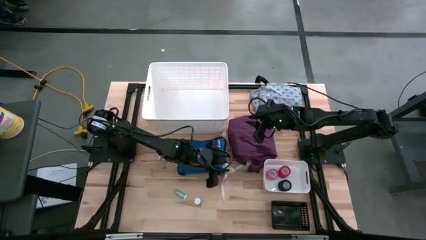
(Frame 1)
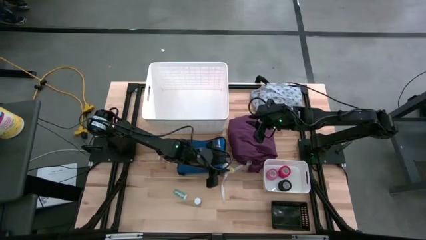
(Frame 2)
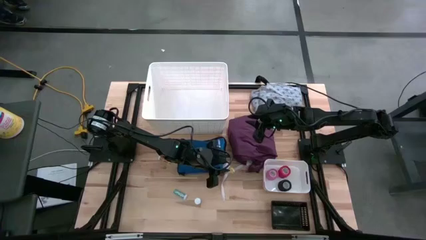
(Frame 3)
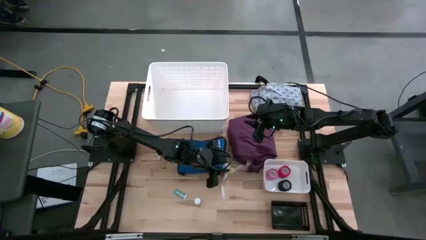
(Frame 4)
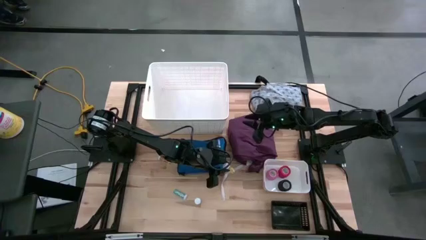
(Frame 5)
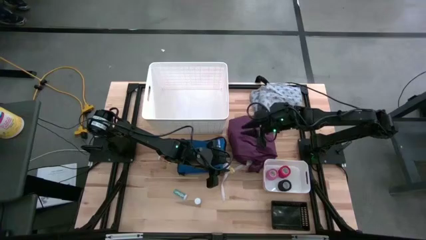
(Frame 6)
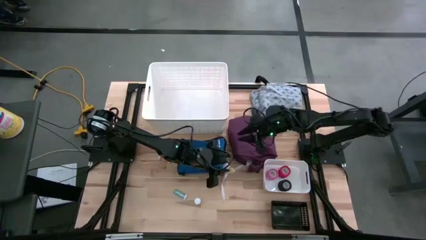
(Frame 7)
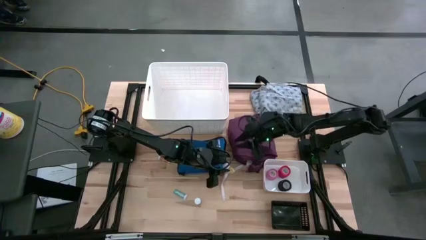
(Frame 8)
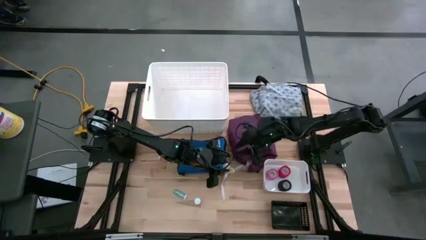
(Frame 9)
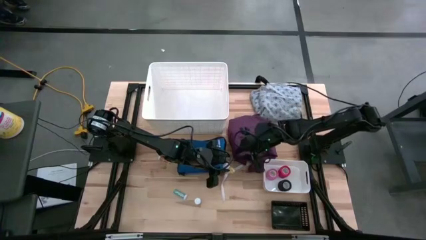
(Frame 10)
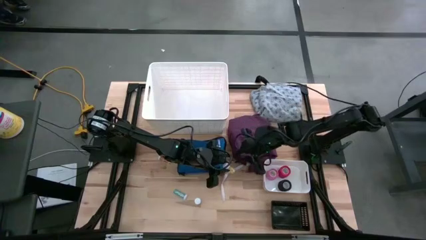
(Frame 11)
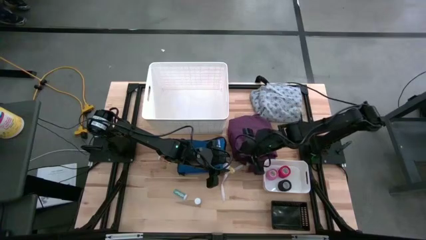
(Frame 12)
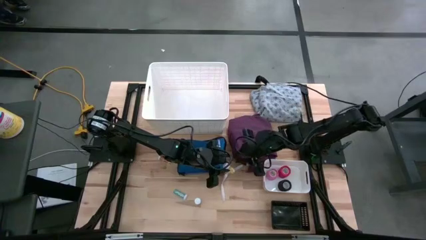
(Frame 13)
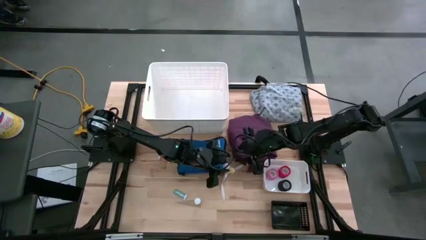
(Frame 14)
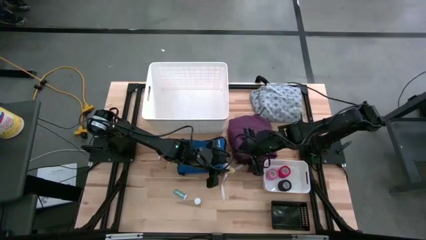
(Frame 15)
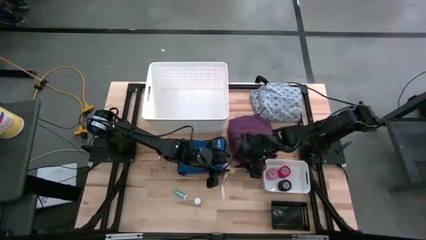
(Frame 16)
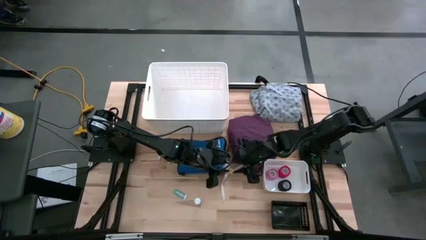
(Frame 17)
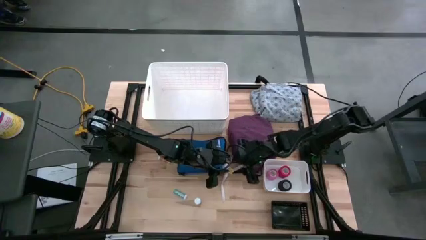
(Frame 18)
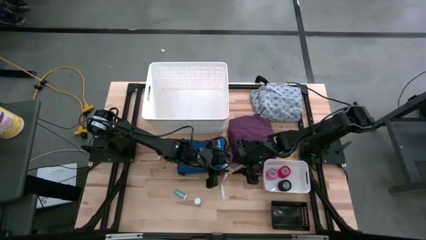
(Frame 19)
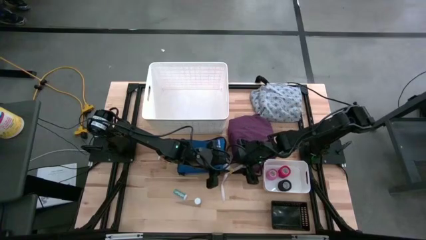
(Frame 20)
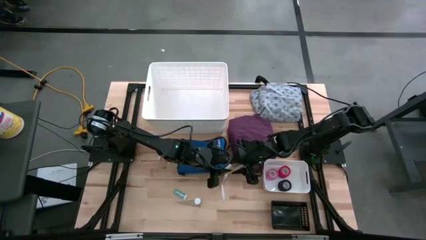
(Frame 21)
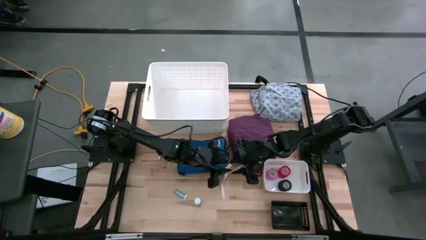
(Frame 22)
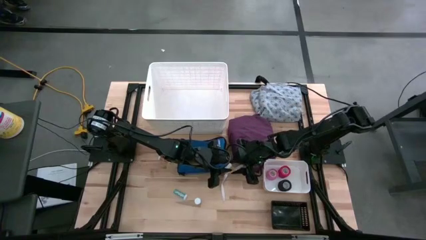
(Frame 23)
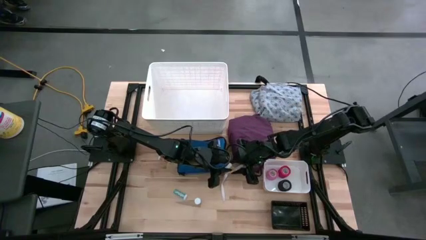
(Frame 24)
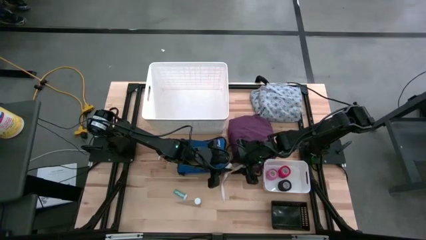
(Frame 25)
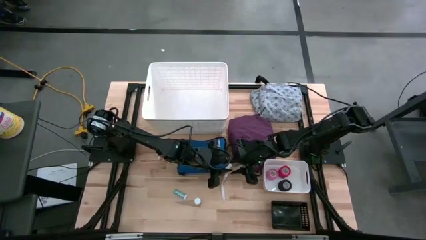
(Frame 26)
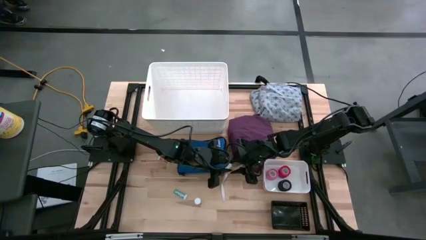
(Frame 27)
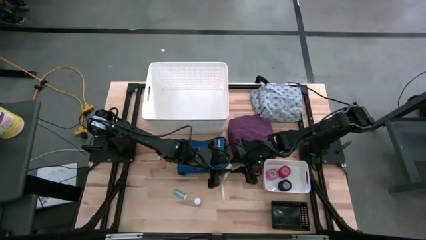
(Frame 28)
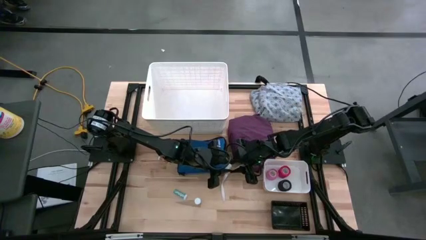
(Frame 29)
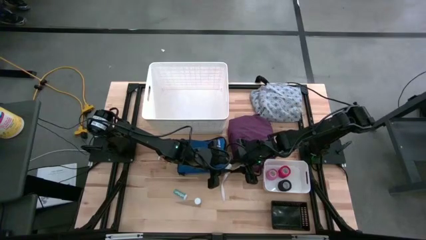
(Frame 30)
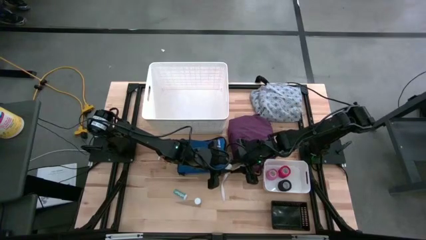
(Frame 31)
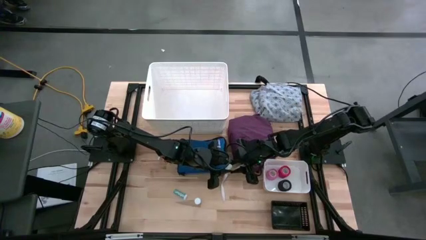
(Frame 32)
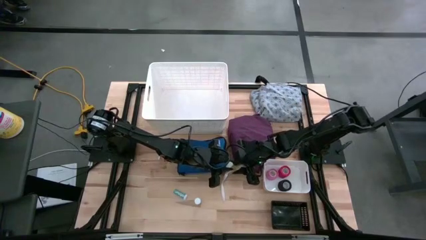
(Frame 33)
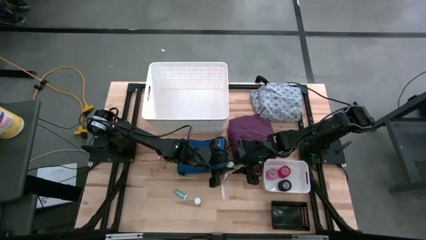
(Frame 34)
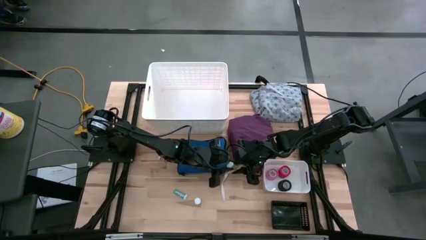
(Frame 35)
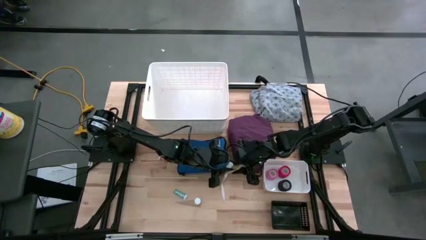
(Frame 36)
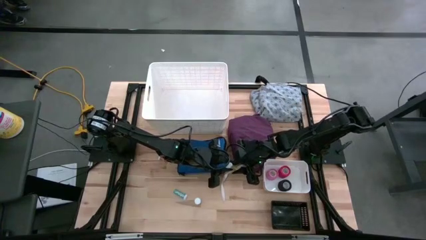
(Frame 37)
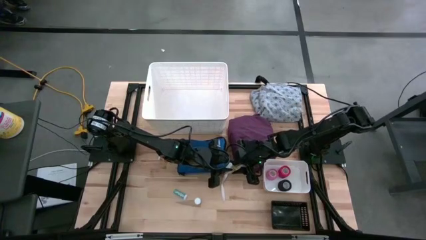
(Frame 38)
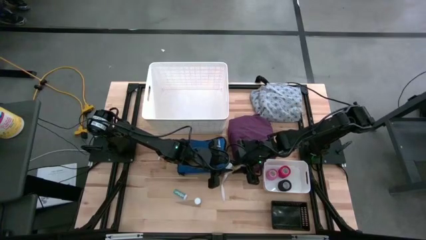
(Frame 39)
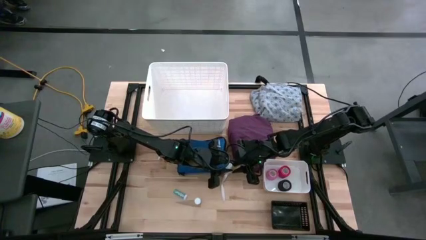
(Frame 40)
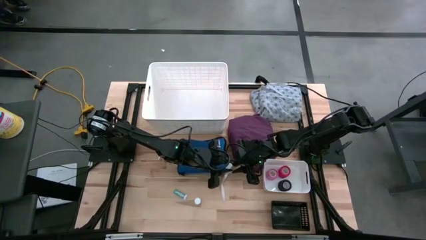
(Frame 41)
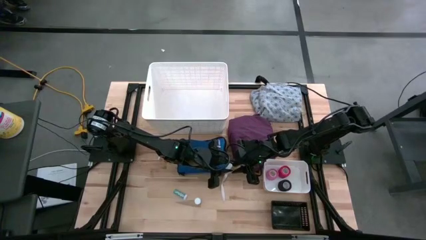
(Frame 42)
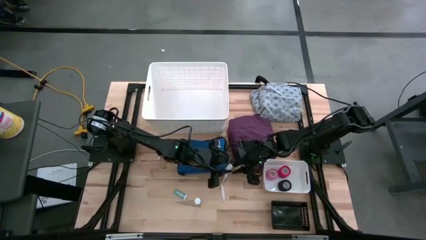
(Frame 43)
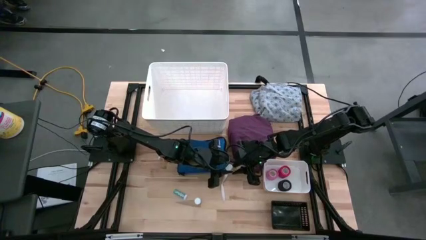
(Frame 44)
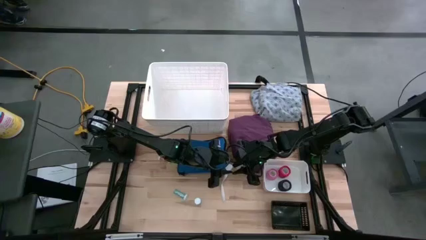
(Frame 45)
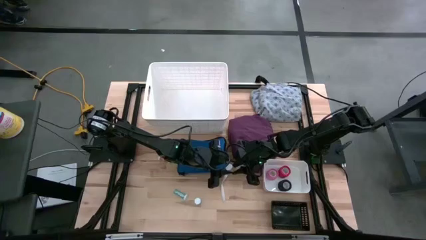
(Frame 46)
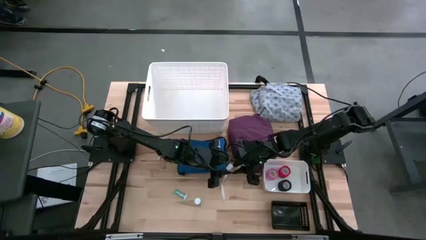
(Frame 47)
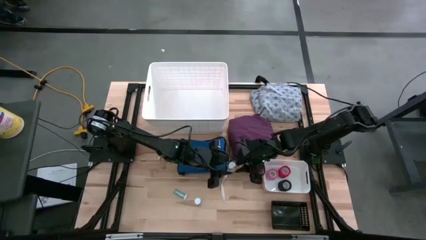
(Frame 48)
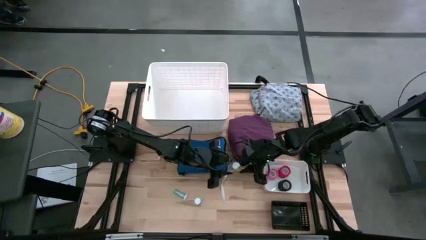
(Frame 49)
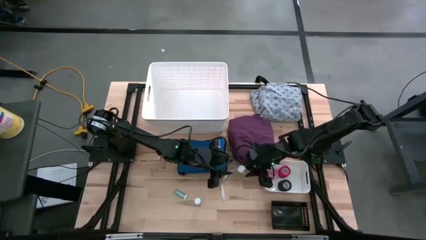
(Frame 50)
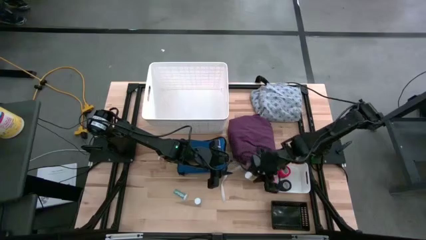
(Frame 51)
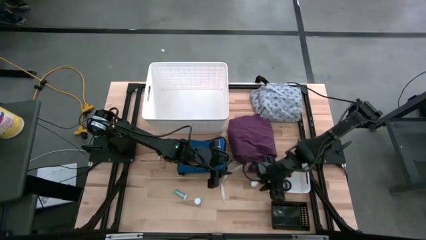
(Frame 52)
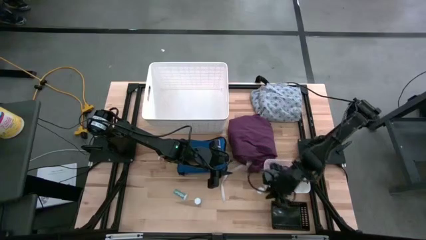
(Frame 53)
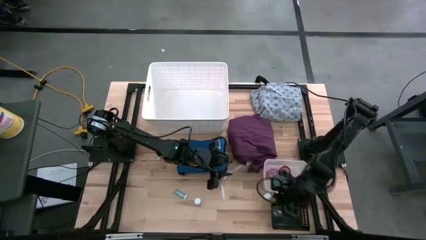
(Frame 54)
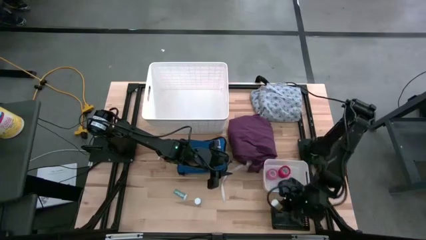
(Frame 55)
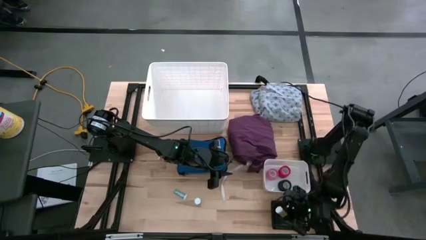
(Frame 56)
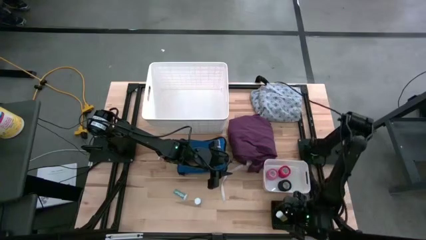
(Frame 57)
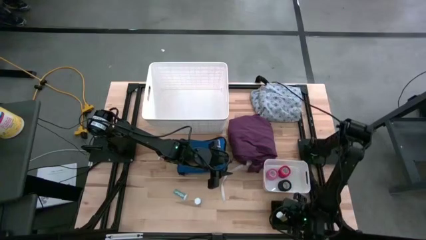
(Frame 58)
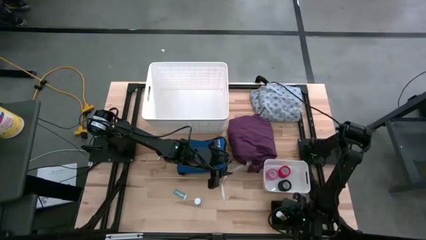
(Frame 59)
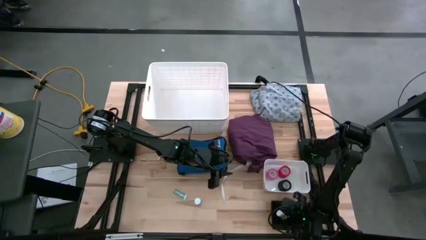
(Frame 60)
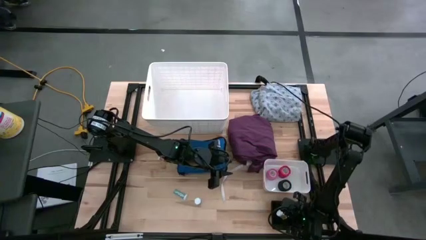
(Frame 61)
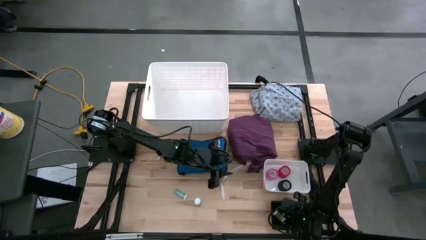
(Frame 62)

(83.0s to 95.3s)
Task: Pick & Place Medicine items
Put the bottom yellow pill bottle into the black bin

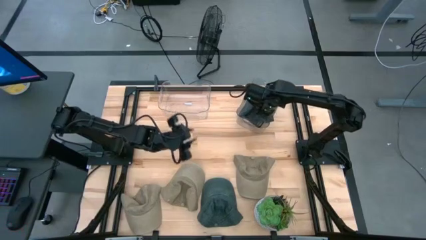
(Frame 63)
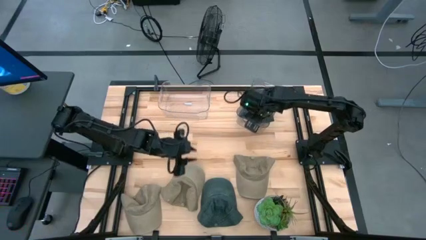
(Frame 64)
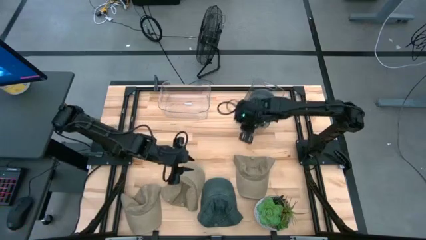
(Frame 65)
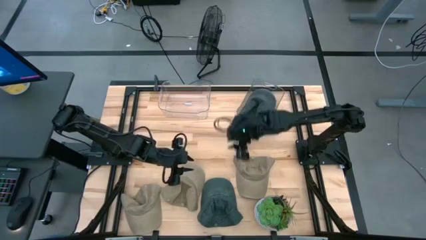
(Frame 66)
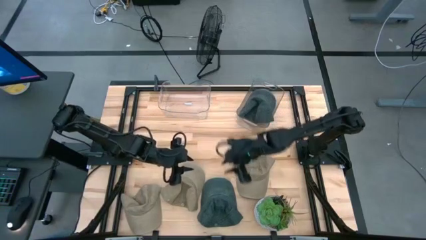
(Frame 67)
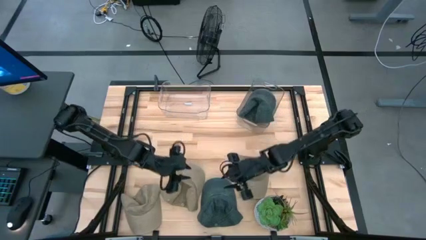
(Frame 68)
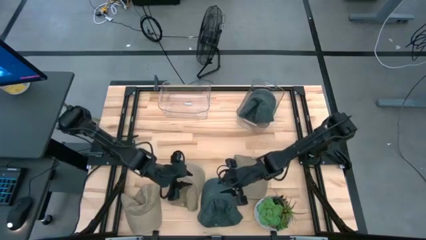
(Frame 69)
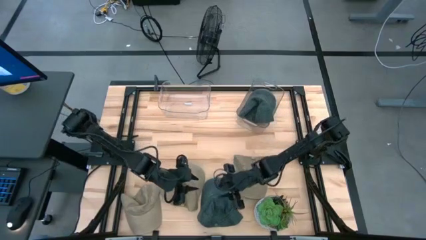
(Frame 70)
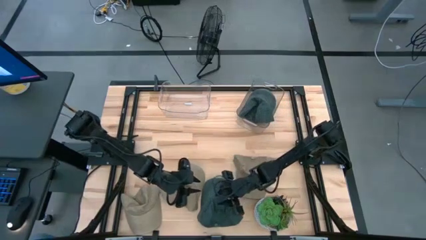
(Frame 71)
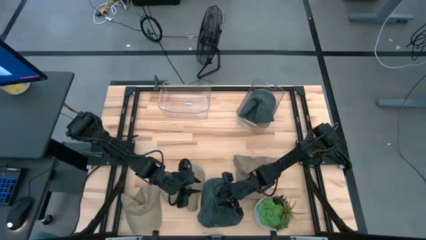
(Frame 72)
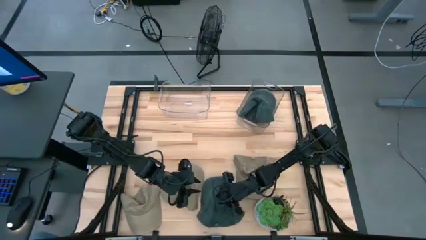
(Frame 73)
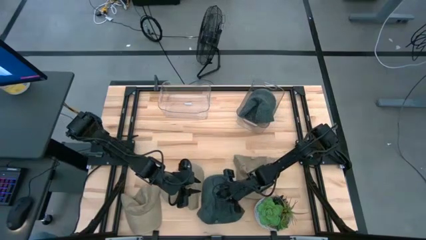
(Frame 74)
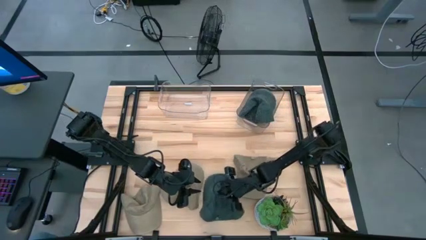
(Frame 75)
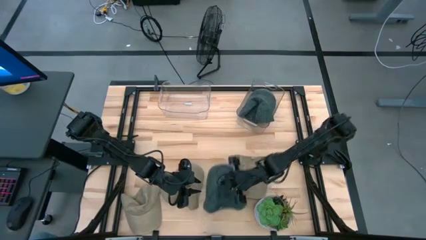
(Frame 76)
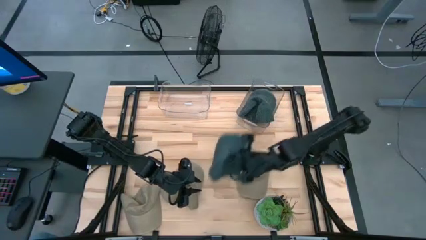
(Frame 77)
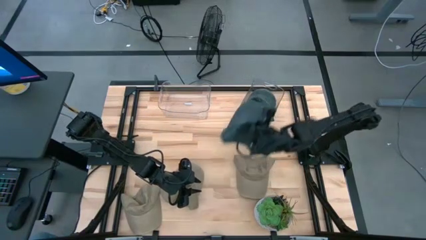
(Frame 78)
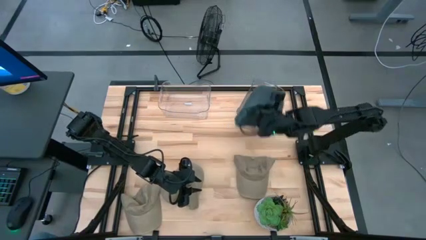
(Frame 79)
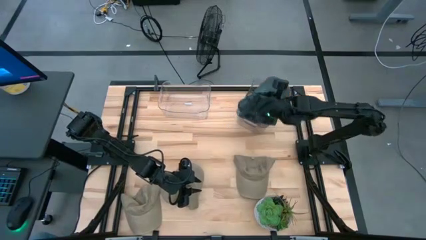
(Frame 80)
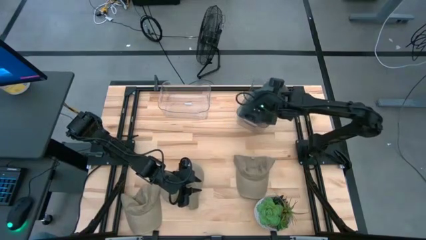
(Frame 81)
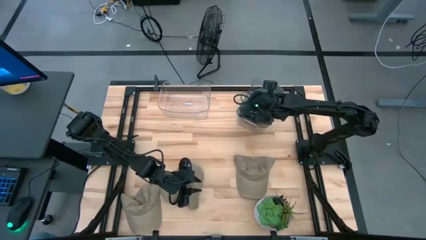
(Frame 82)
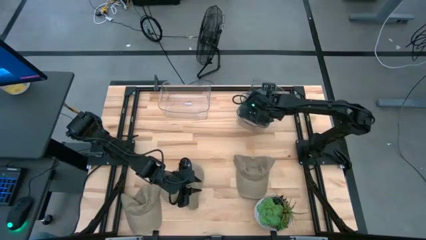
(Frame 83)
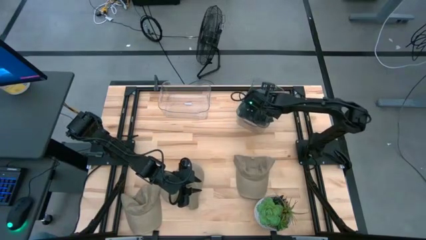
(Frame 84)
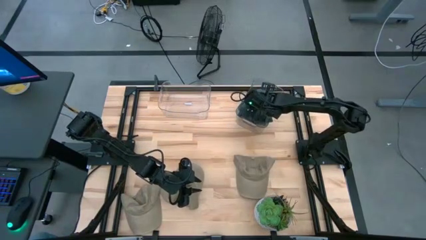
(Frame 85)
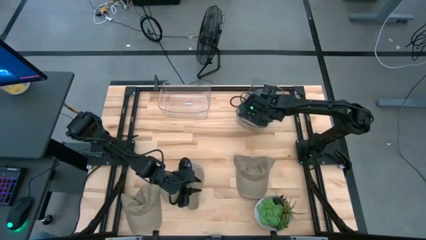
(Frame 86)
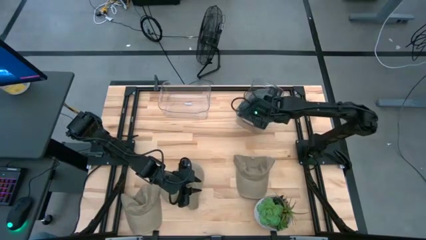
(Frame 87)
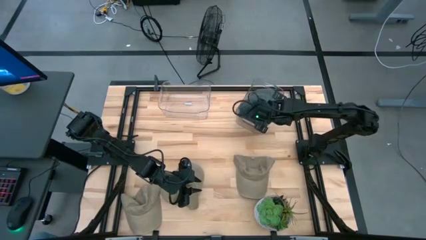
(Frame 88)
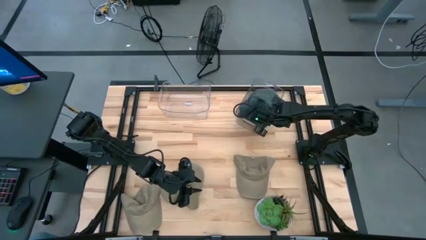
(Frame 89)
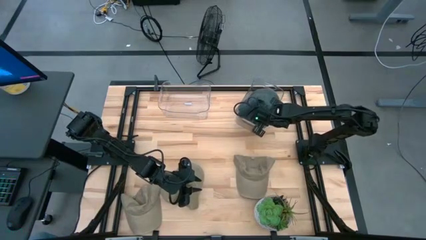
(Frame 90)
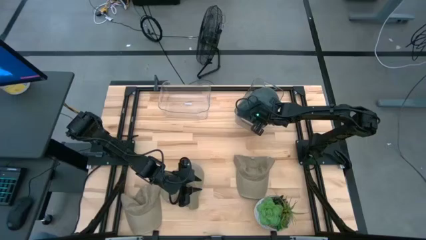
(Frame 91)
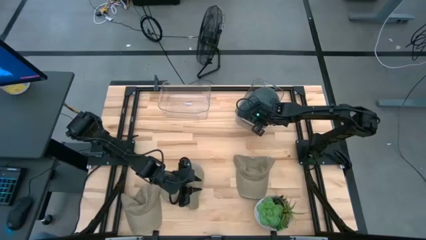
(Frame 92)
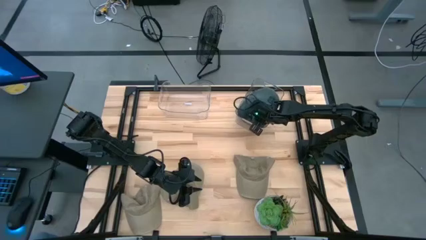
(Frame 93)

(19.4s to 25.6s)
Task: Pick & Place hat
Put the black cap into the right transparent bin
